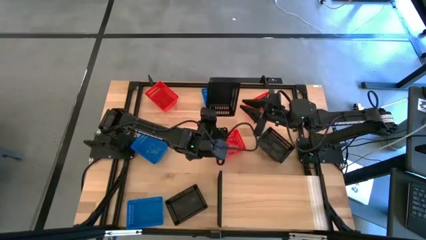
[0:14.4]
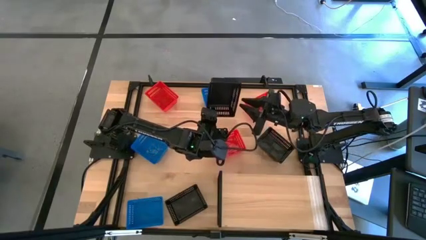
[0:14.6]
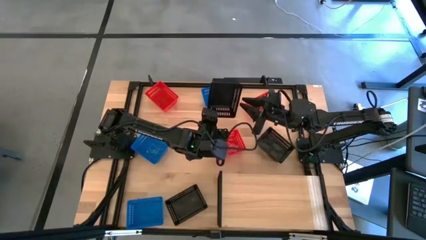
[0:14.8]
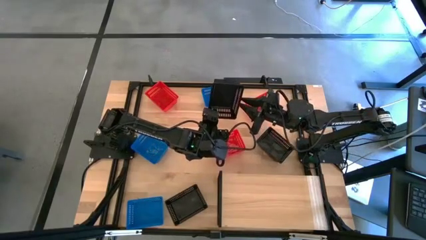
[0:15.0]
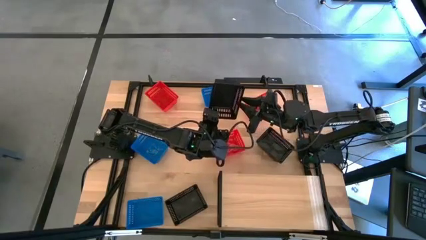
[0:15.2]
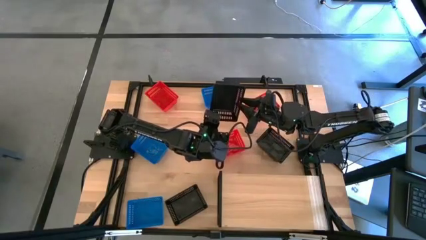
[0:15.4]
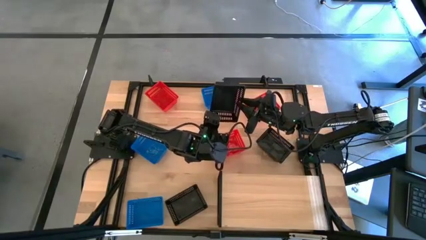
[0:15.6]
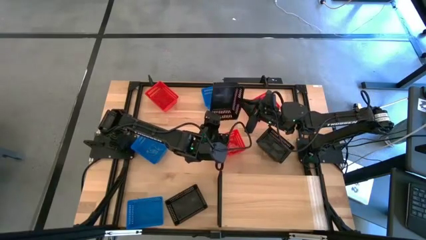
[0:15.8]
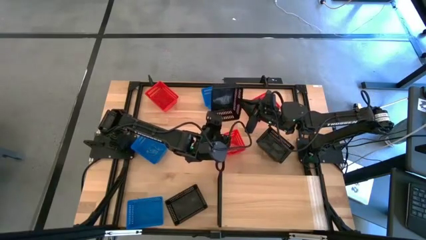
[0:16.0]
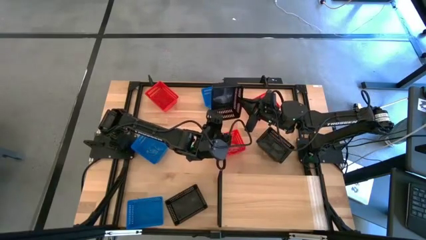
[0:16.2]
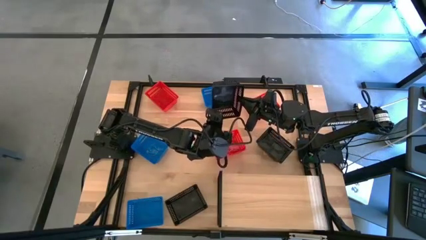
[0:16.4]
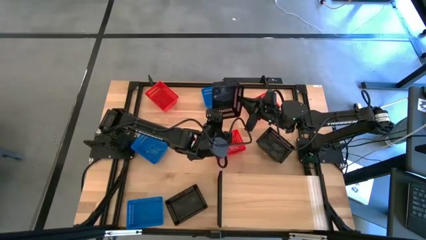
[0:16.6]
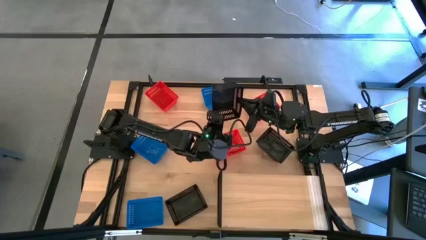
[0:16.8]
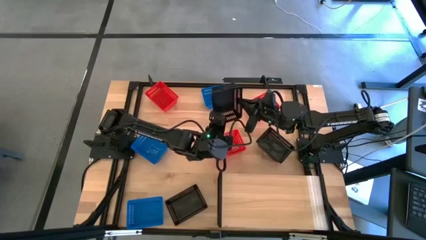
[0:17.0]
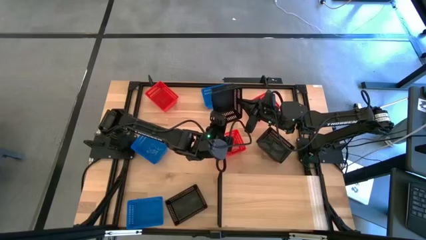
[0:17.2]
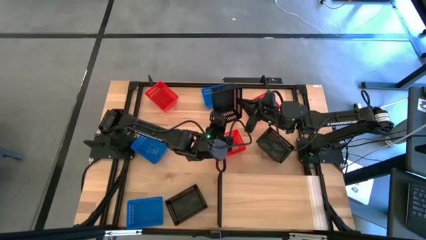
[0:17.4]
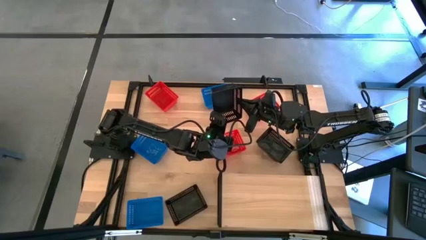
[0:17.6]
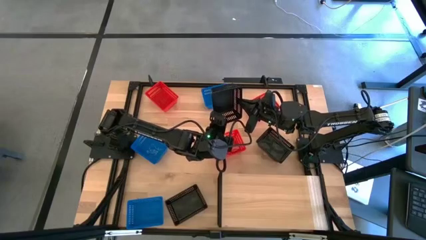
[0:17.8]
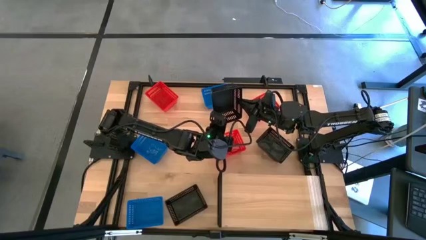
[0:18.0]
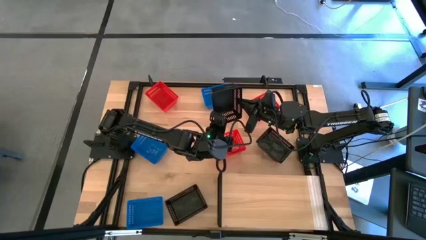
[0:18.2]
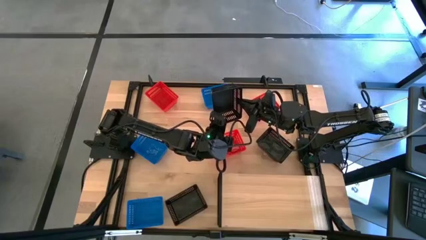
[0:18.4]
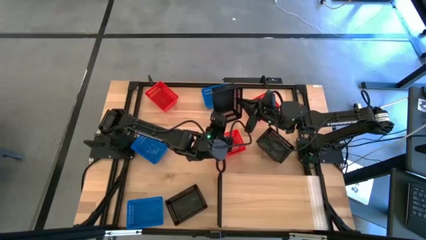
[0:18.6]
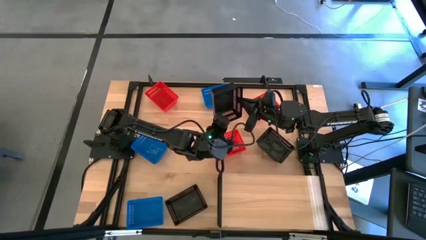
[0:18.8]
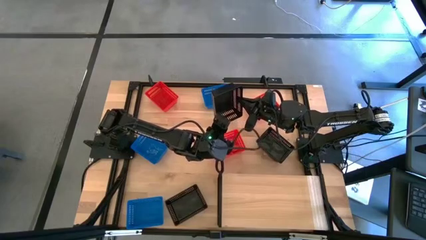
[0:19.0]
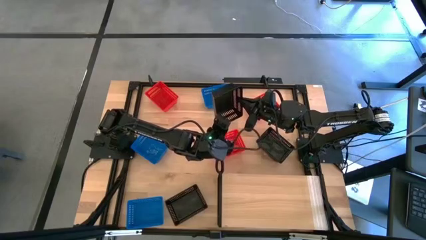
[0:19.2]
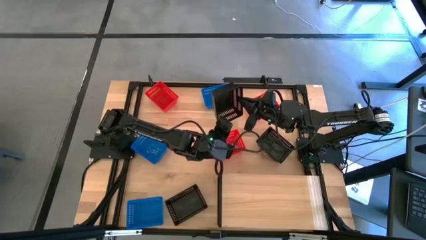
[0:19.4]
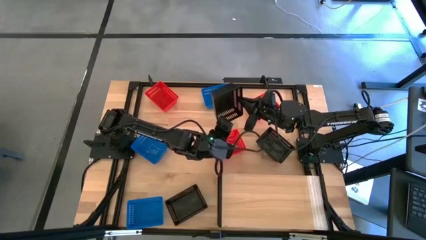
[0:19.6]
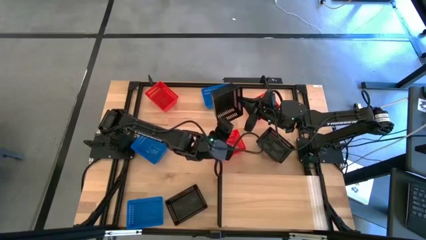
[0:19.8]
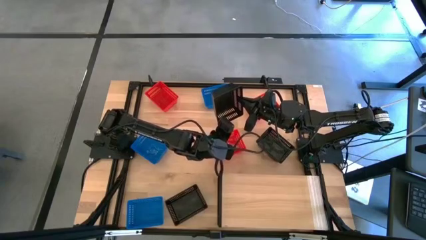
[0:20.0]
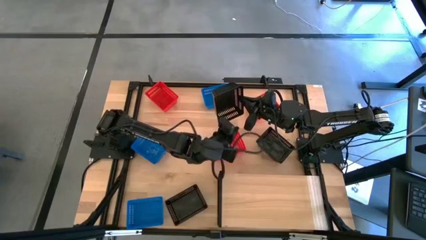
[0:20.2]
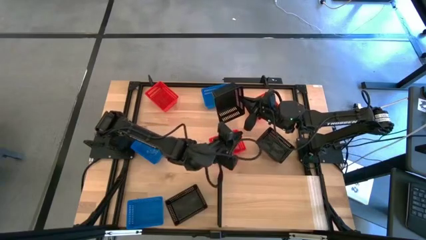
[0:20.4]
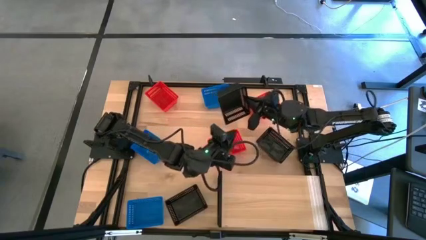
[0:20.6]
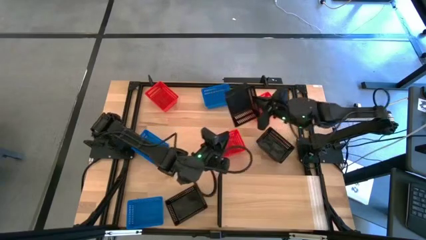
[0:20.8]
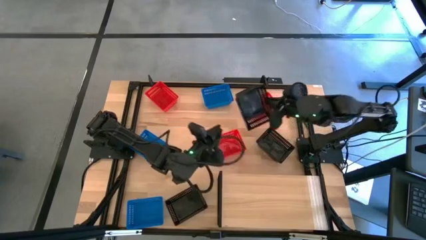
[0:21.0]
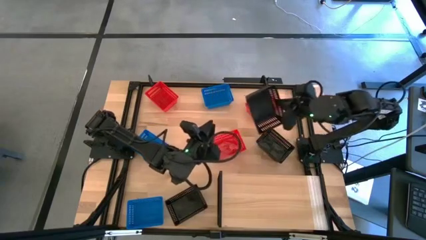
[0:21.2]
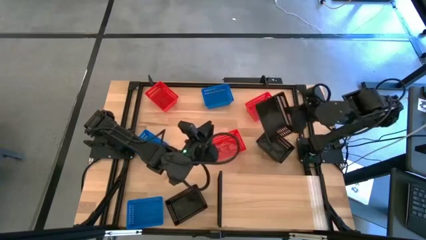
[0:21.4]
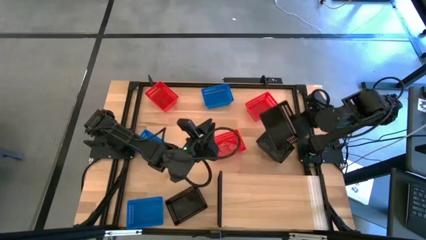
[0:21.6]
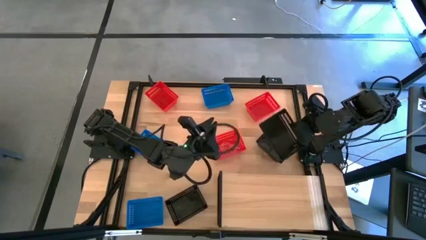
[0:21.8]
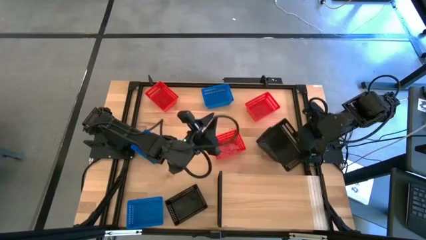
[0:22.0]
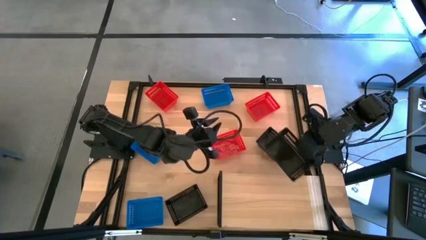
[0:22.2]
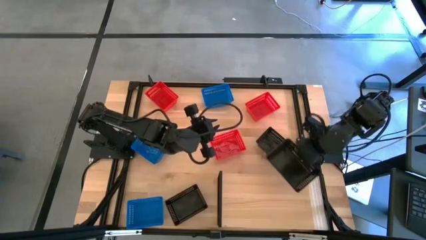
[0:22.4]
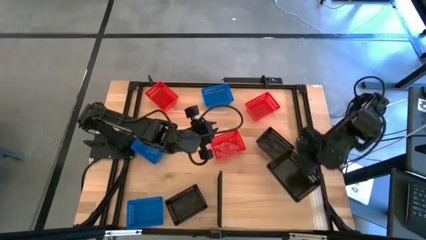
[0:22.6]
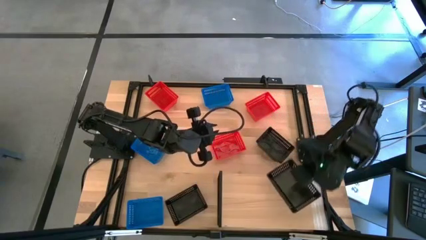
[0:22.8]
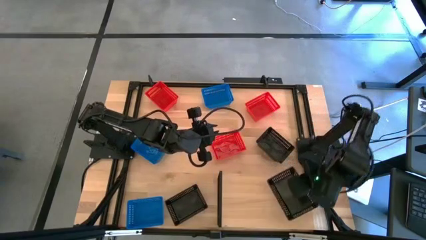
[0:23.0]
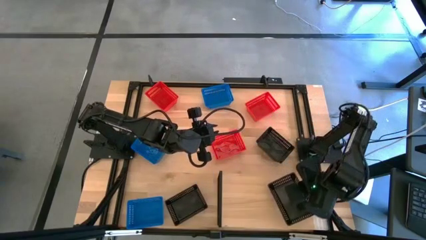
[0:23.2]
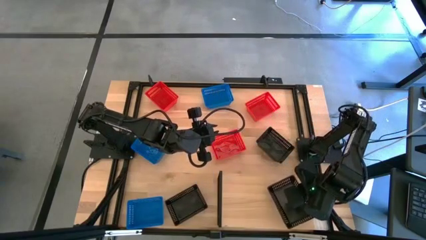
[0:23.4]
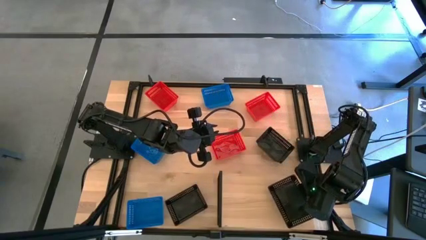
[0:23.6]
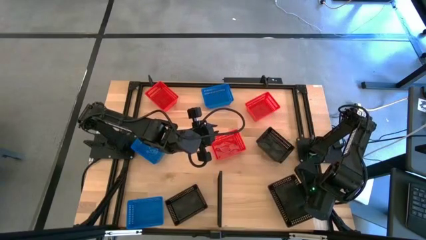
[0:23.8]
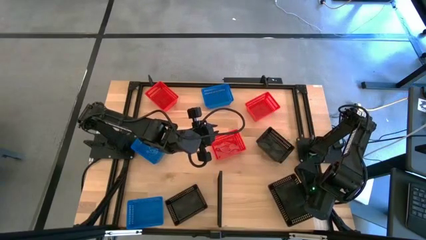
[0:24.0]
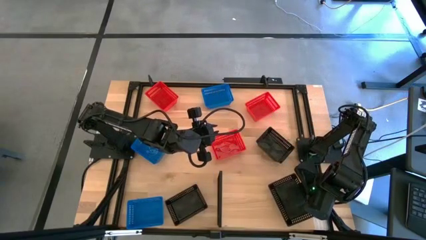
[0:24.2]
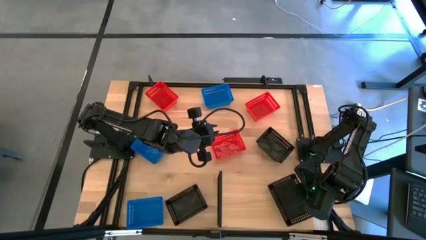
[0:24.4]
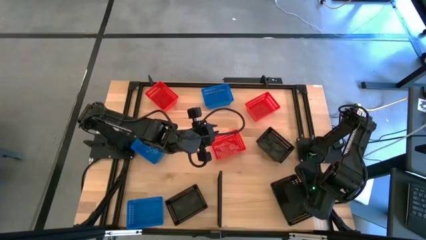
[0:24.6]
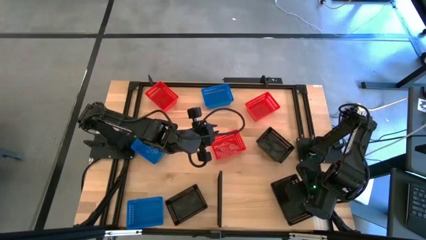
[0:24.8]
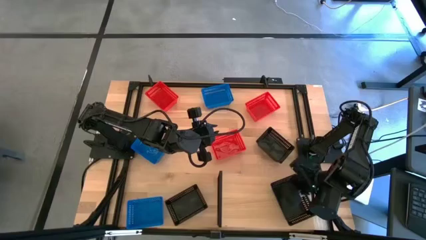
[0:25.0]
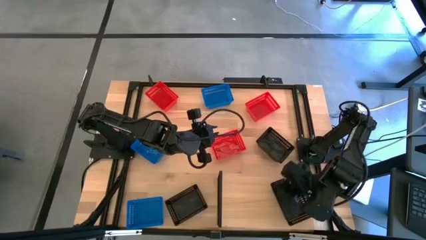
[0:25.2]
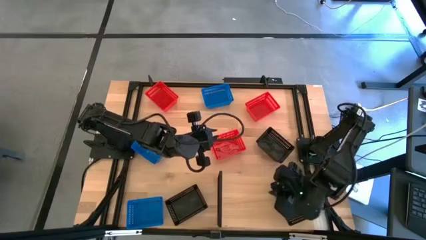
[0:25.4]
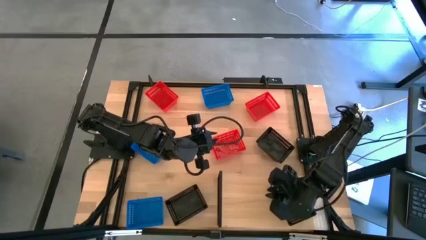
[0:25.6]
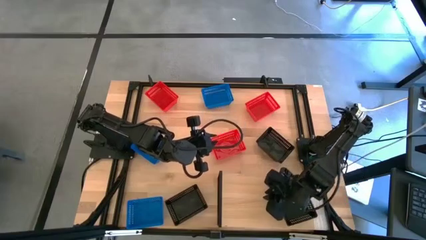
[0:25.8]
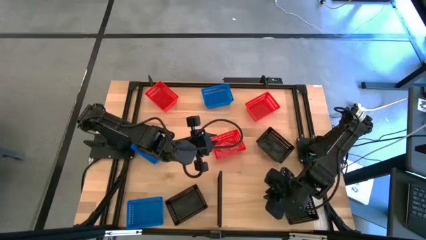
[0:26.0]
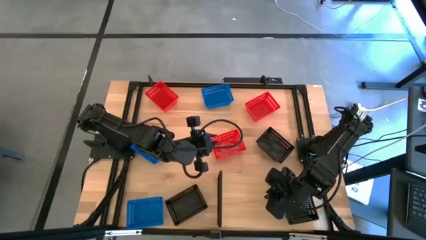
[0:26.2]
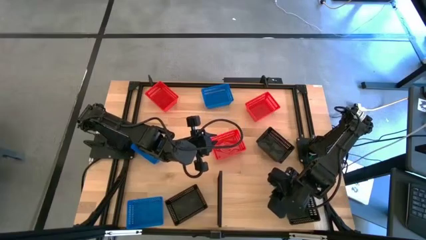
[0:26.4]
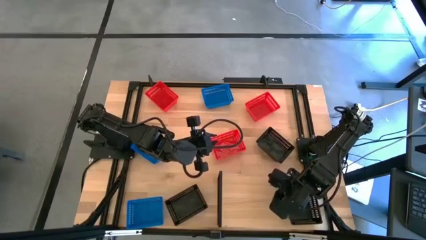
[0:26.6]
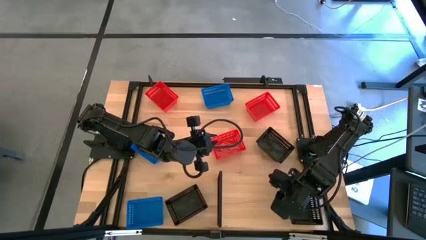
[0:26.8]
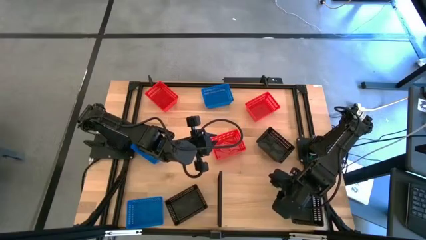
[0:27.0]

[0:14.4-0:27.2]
Task: Stack baskets on shelf by color
Put the top left black bin on the shelf

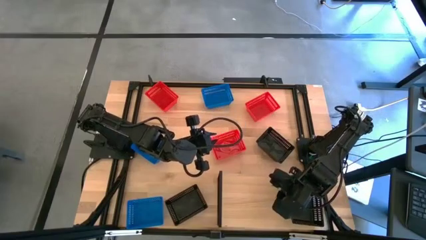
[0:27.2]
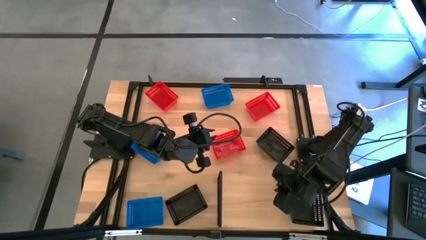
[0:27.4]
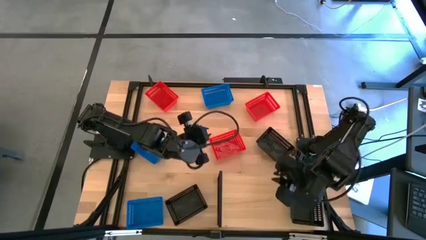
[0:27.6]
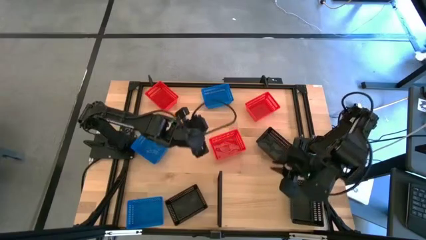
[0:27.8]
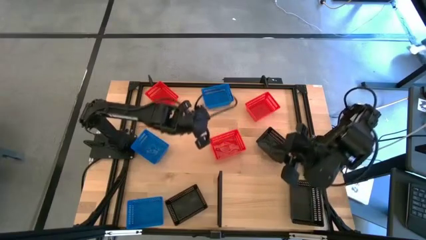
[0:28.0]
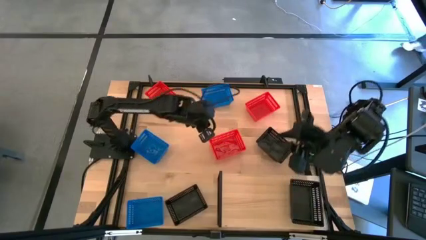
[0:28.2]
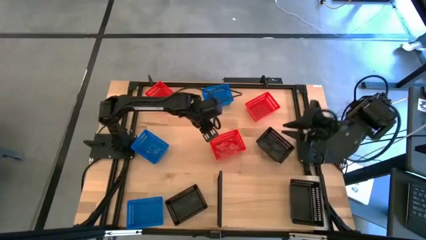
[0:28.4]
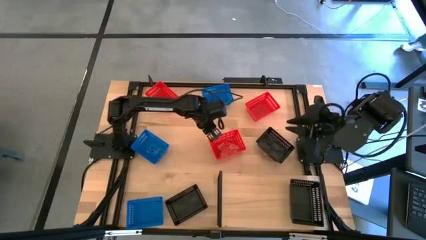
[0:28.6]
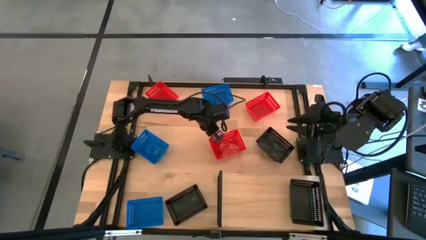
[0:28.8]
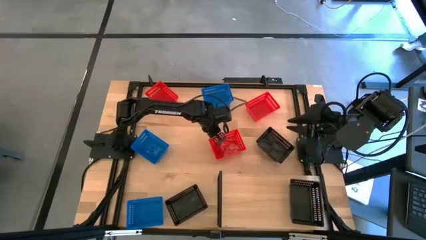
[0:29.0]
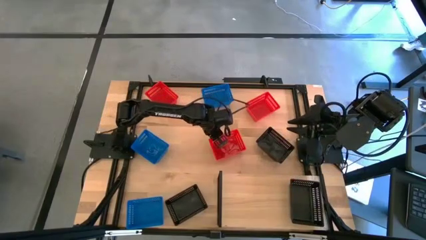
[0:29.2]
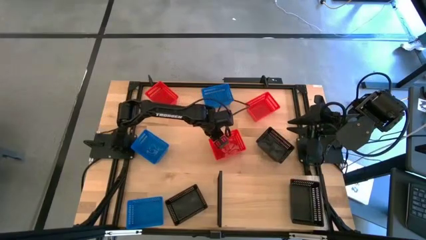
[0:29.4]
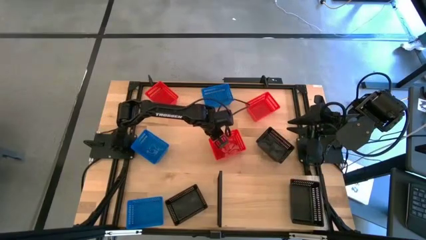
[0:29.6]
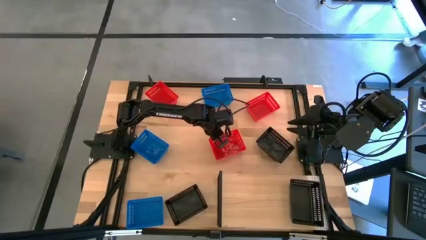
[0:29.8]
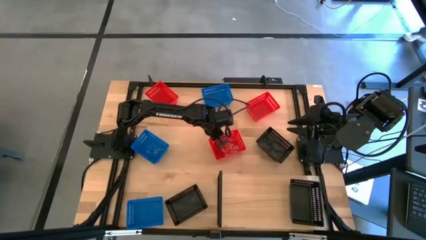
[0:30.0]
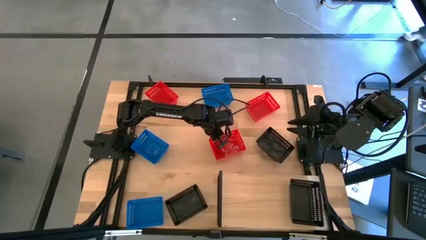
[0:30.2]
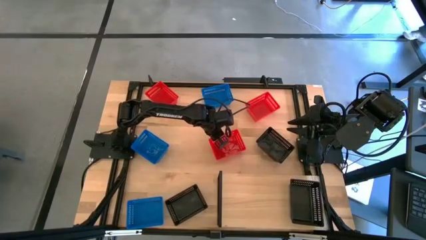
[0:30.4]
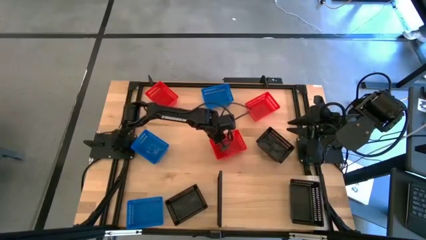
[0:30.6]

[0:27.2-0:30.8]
Put the bottom red bin on the shelf
